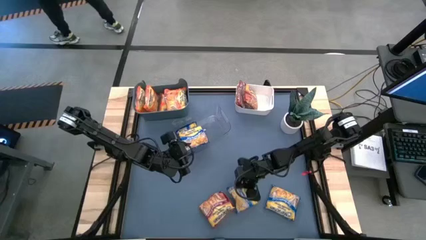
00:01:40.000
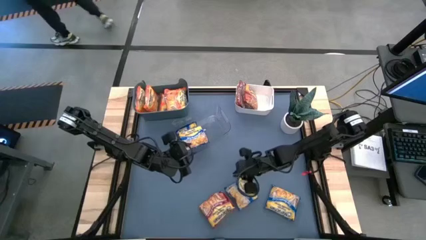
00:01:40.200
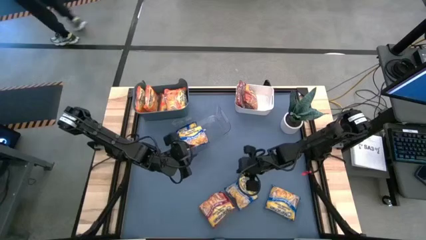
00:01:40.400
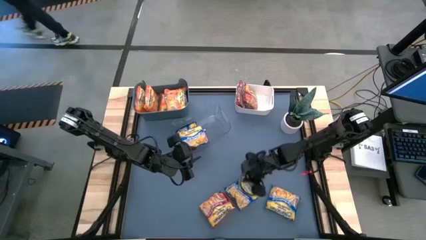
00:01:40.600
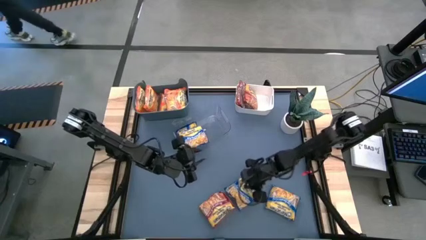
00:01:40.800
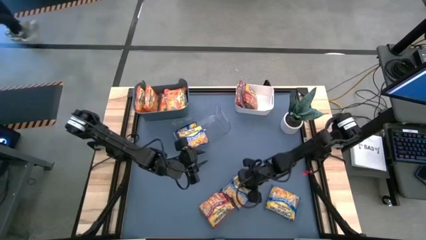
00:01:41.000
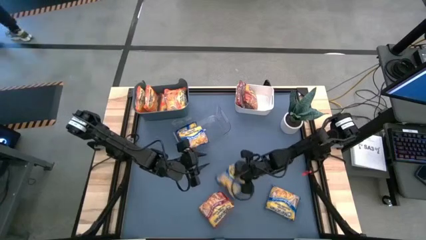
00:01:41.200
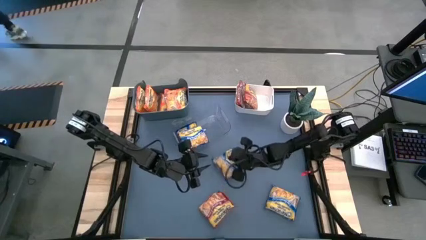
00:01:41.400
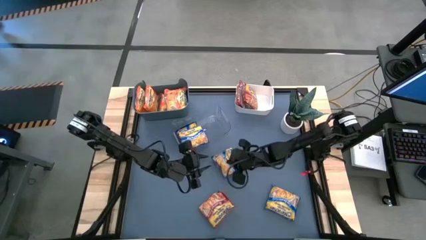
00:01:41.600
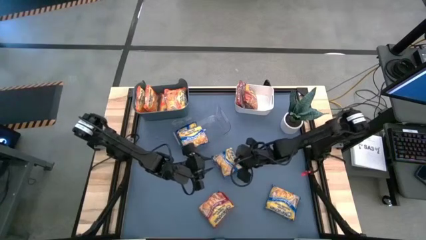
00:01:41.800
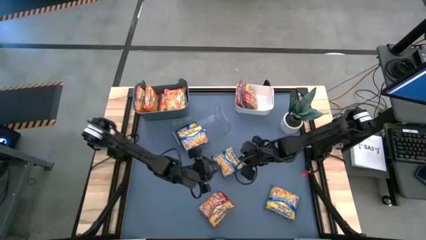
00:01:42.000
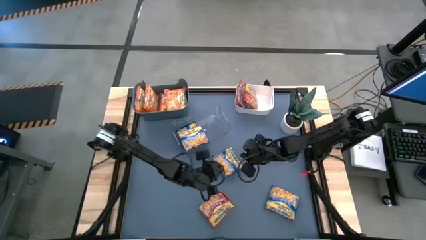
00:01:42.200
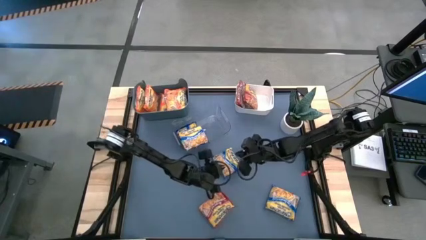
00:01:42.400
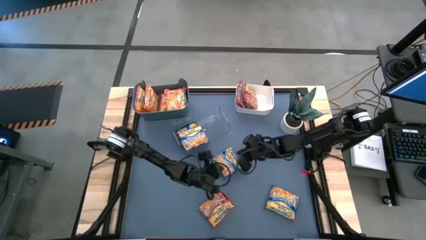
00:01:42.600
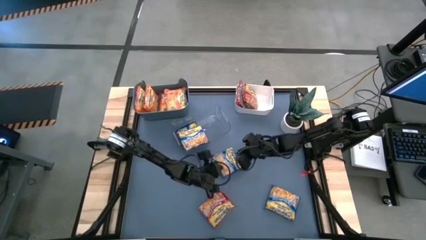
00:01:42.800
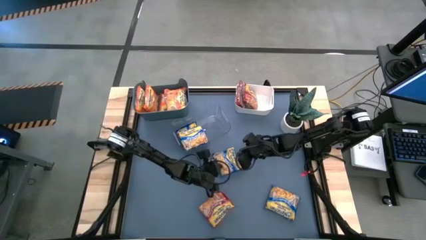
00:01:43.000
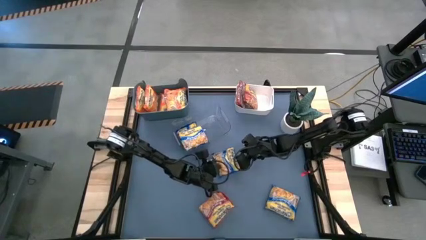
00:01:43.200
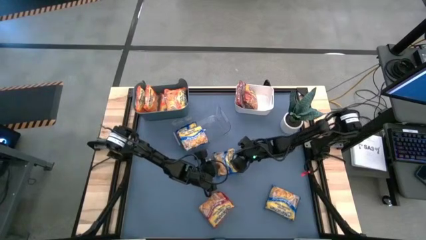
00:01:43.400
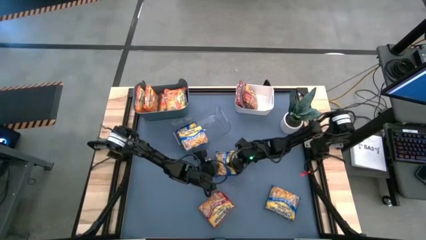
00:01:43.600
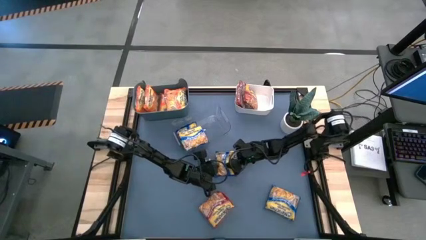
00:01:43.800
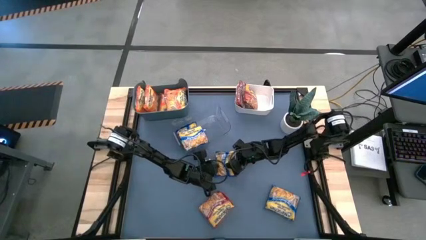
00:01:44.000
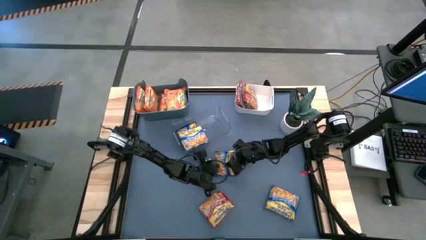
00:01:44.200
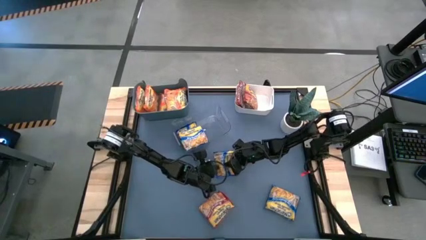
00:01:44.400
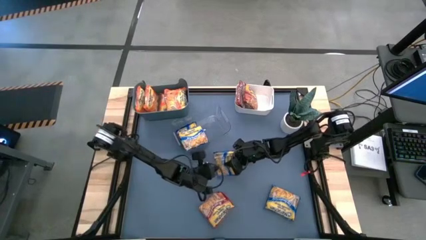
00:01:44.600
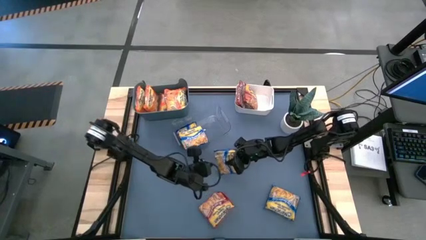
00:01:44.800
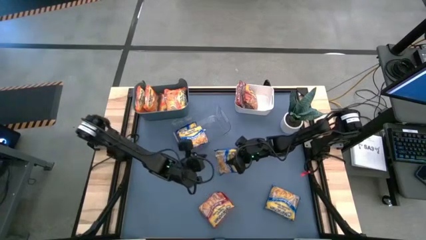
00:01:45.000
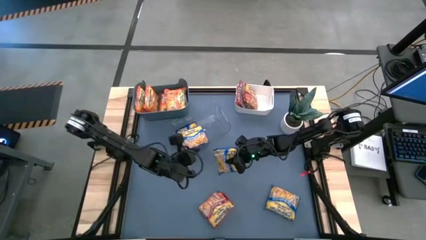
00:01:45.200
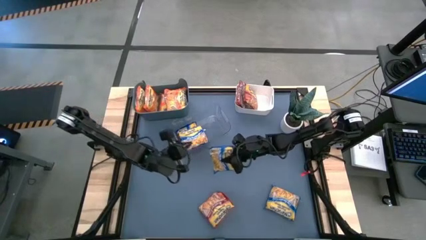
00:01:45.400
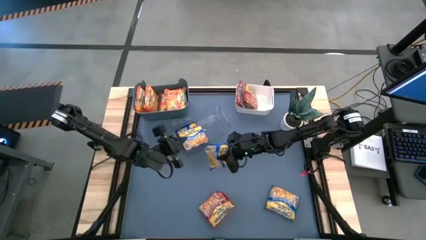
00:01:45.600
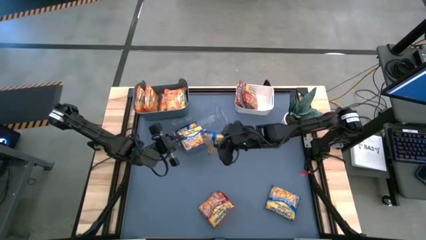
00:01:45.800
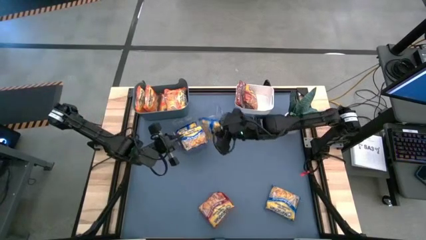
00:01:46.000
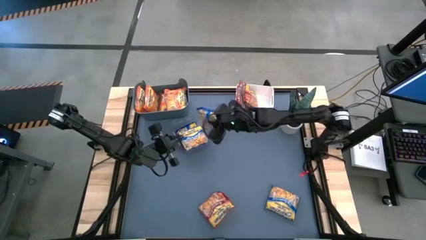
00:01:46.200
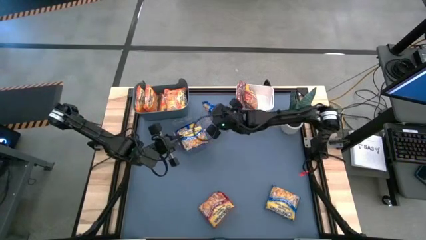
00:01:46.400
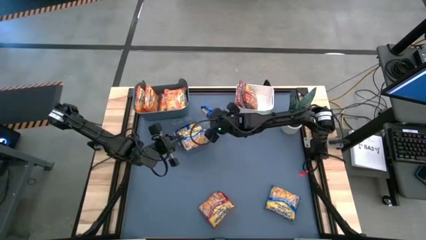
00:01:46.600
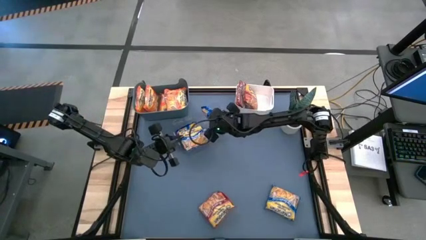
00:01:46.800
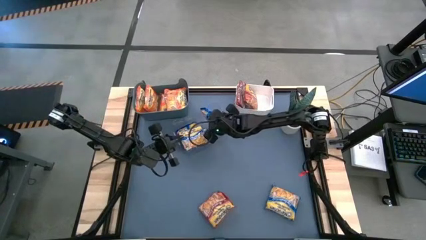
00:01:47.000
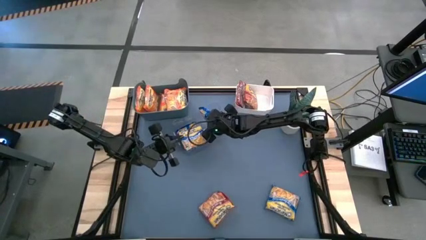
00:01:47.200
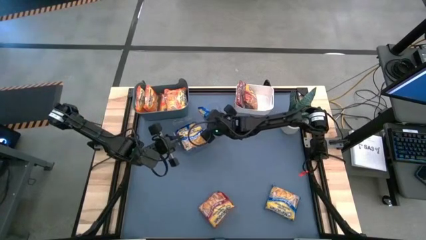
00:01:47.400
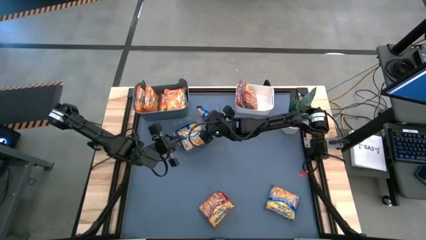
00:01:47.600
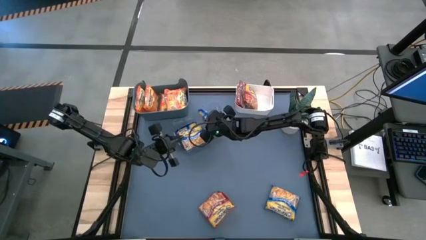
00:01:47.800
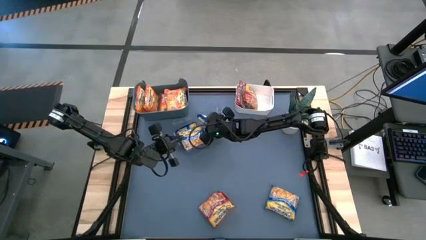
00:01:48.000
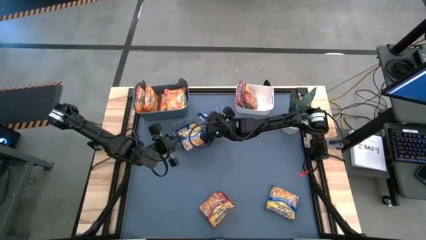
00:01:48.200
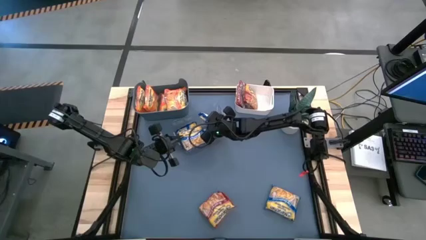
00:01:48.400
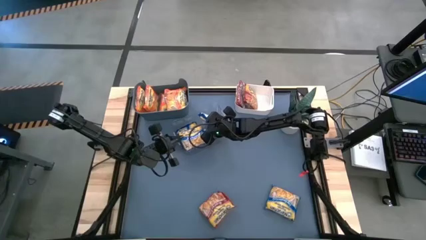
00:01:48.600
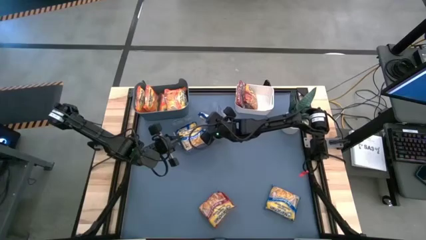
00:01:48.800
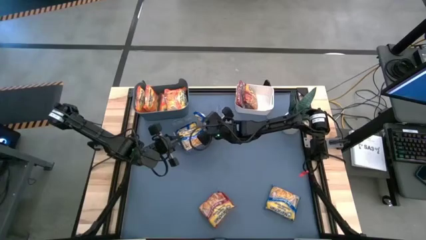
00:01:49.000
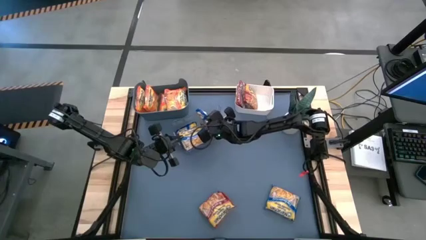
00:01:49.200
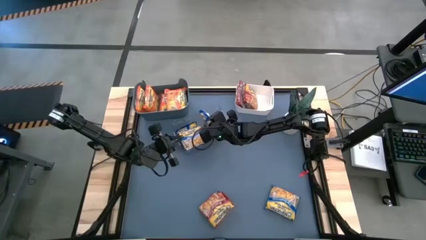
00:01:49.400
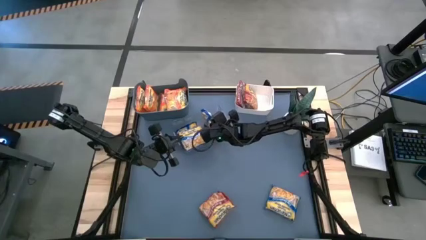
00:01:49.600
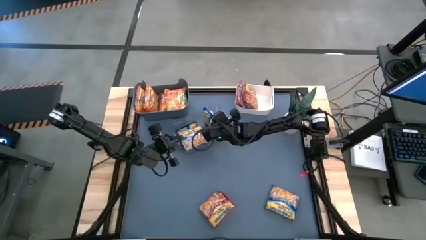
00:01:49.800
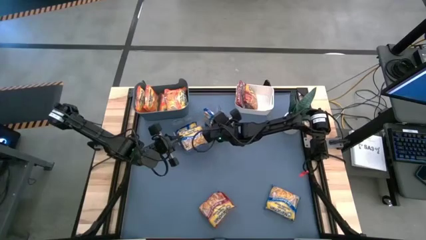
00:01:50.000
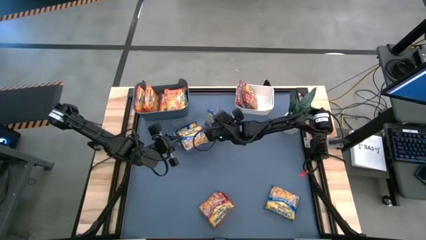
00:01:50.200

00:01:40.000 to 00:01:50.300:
Task: Sort Maruchan noodles
Put the blue noodle pack into the transparent bin

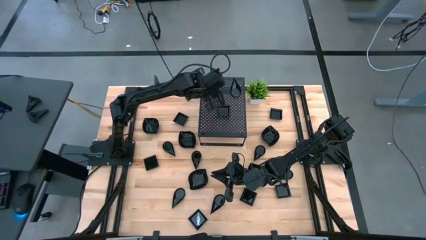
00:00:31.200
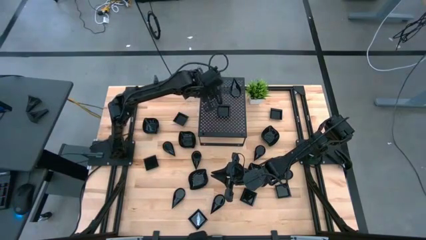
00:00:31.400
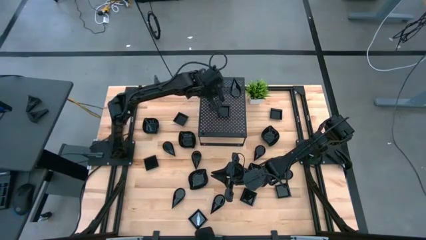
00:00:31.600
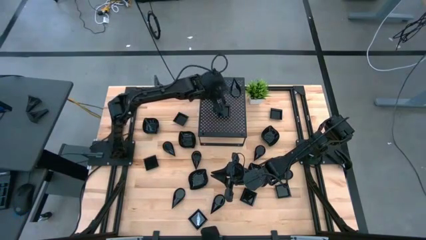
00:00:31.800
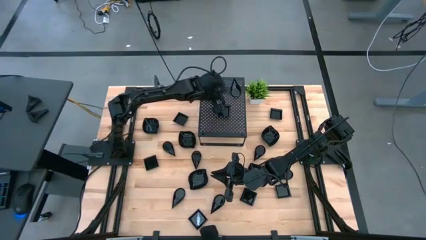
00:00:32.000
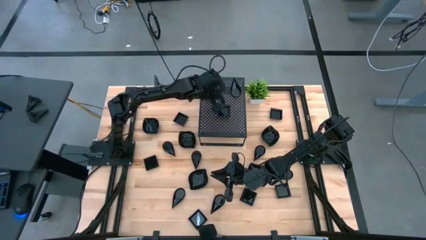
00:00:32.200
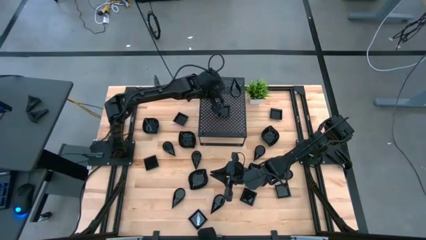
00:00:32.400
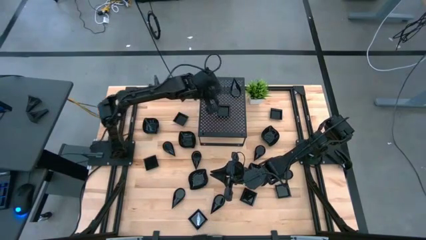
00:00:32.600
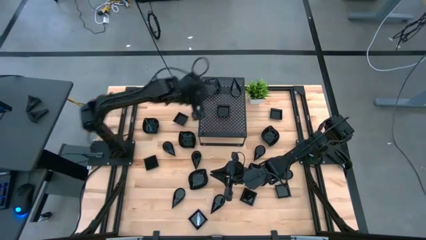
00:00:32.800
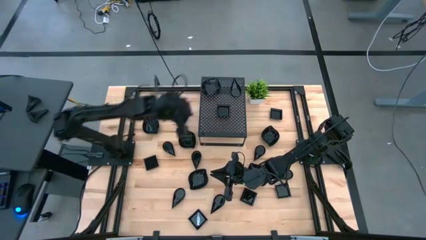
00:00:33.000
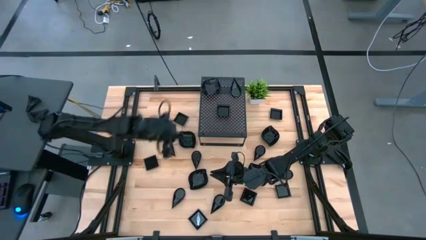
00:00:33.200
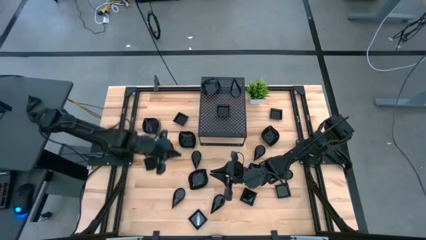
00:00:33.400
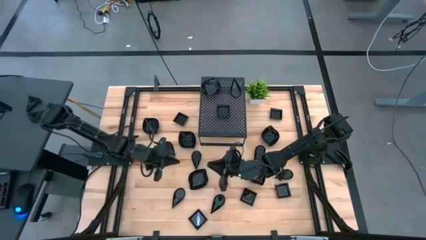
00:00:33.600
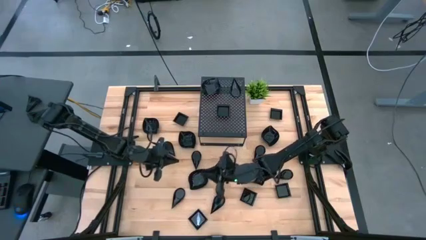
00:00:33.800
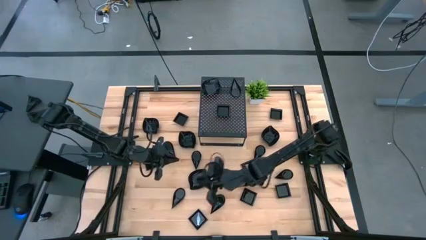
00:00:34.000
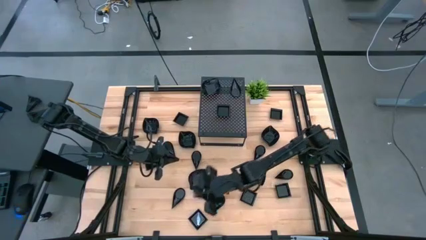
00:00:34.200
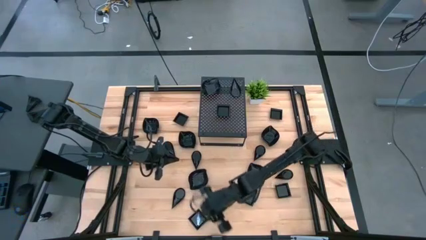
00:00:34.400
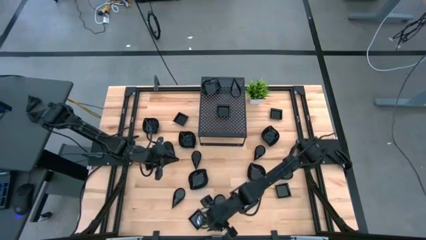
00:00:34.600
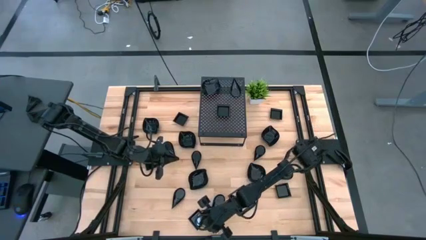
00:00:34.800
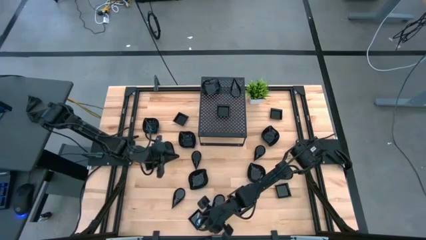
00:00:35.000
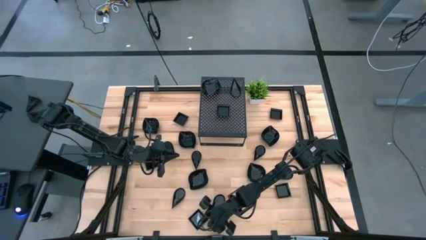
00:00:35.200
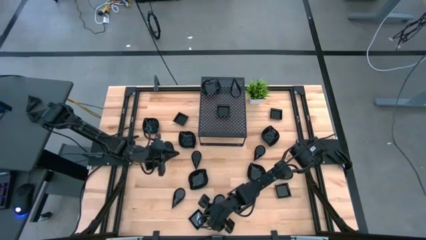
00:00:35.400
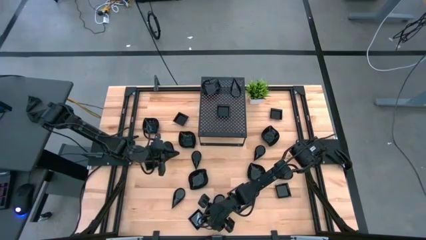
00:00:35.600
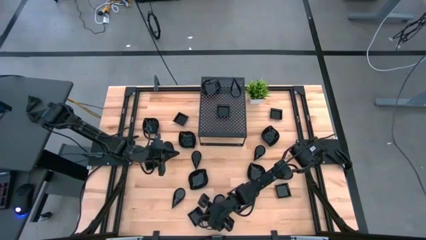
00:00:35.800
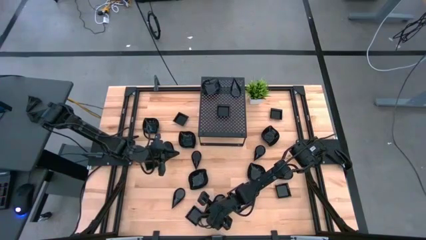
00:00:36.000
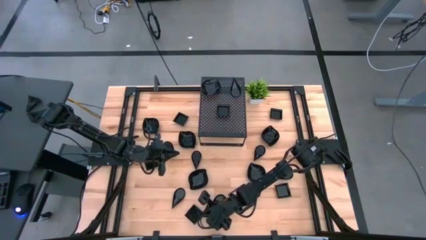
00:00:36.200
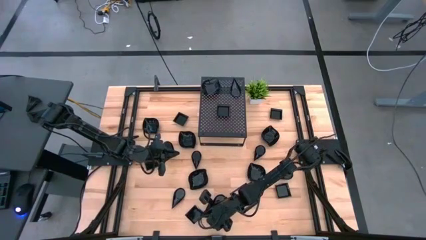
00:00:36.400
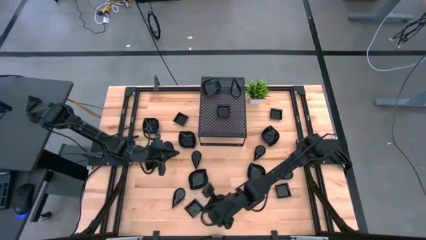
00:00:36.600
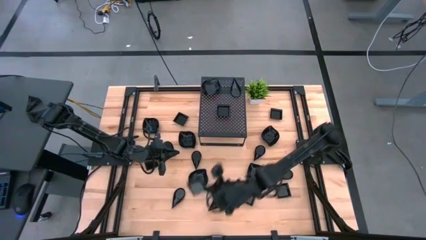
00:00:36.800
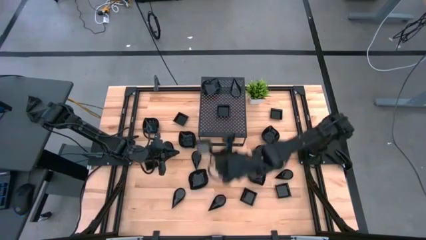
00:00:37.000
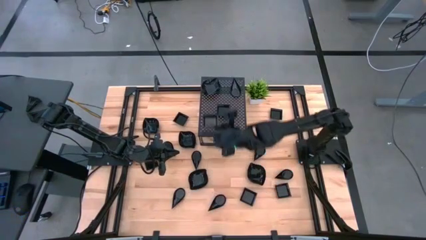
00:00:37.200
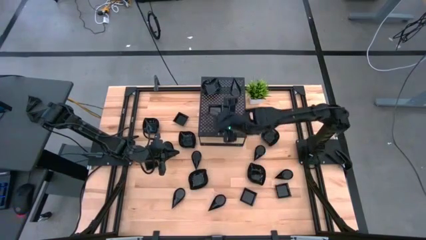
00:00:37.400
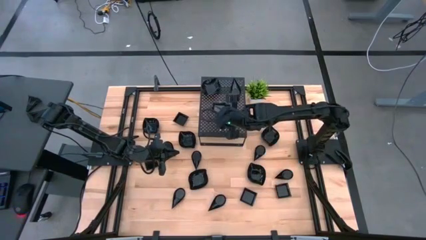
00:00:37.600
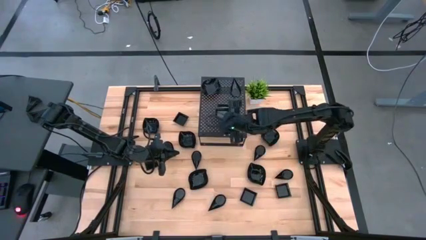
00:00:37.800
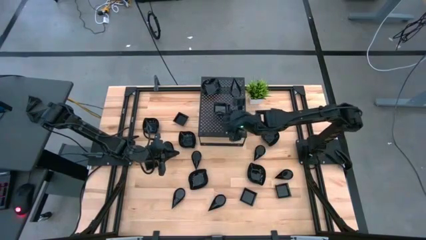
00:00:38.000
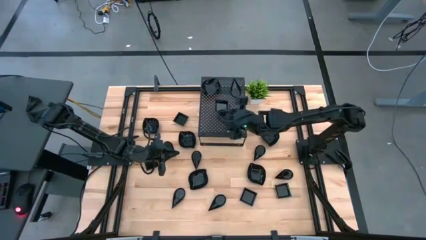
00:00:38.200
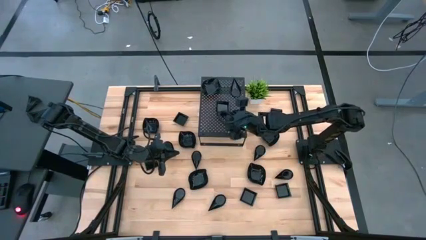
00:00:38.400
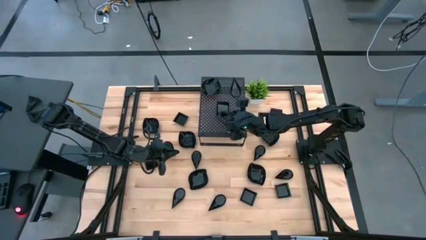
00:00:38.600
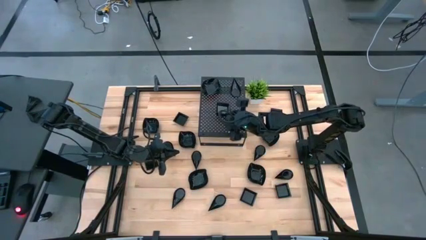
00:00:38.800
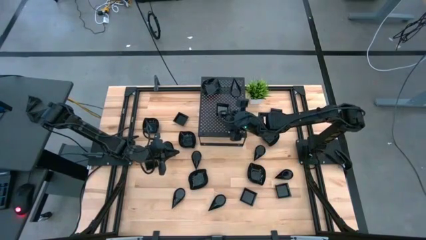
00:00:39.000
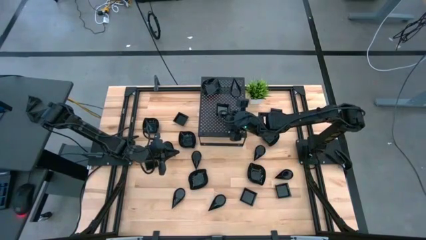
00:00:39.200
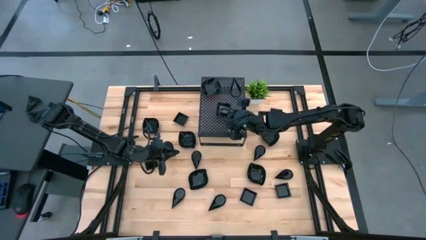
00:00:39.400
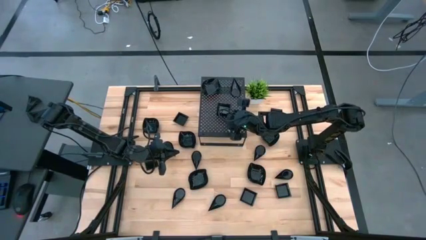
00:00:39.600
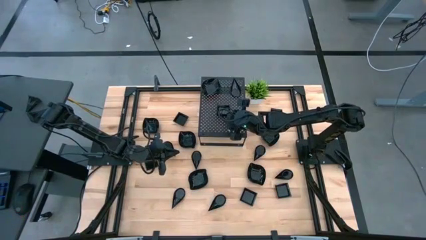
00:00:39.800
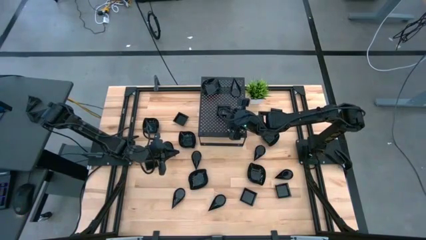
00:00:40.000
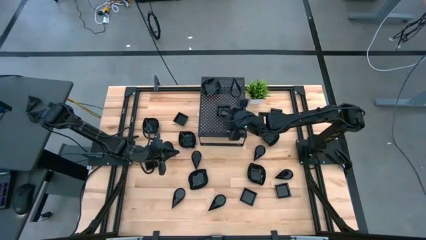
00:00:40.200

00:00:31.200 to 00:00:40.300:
Task: Pick & Place Mini shaped plates
Stack the black square-shaped plate on top of the black square-shaped plate on the shelf
